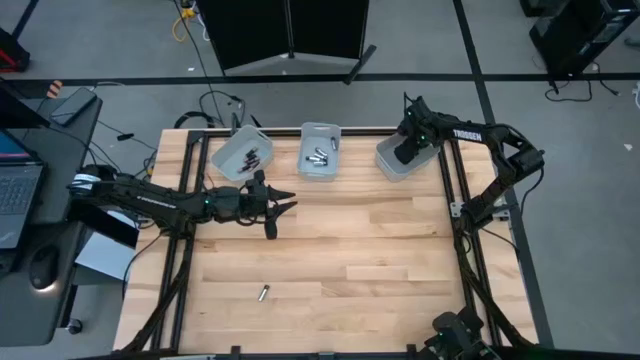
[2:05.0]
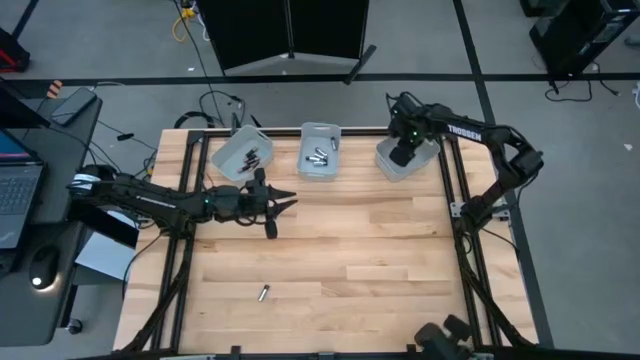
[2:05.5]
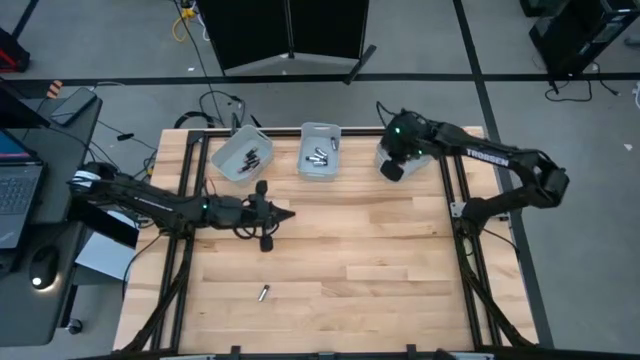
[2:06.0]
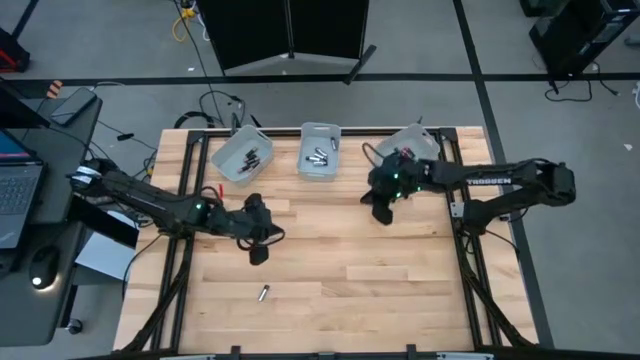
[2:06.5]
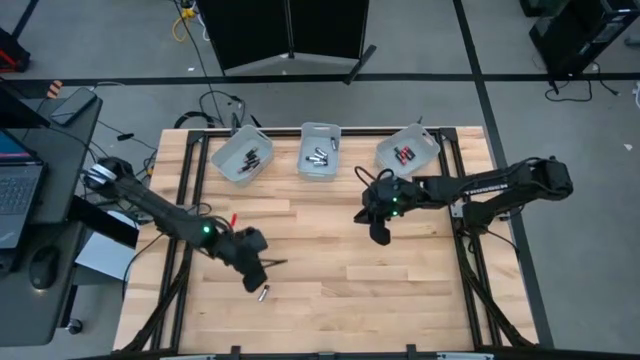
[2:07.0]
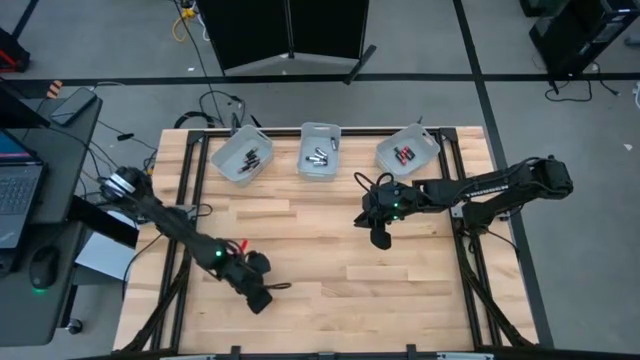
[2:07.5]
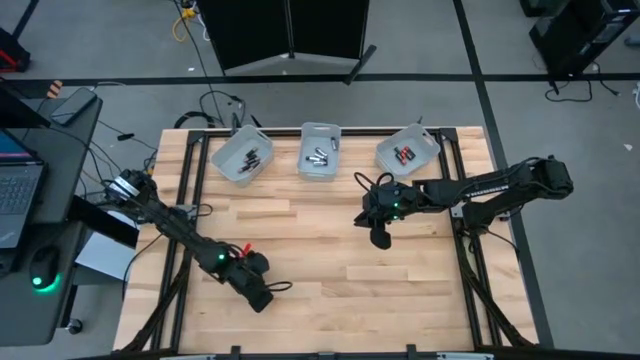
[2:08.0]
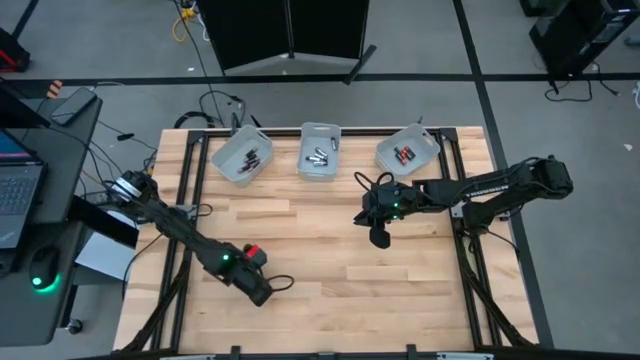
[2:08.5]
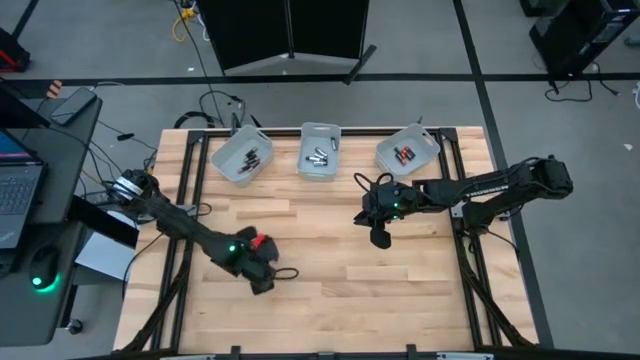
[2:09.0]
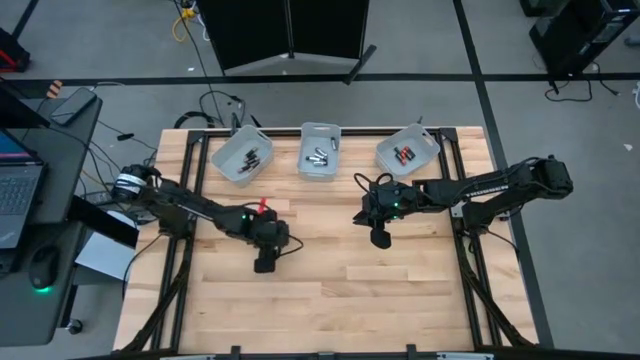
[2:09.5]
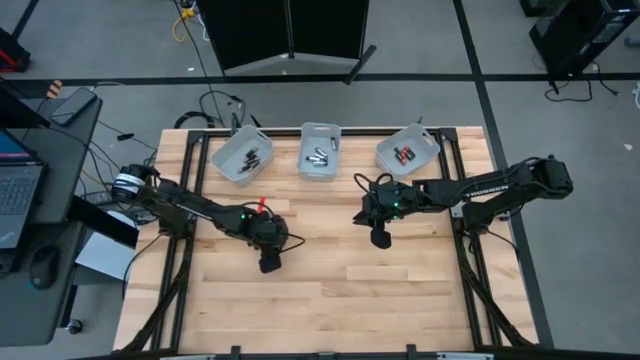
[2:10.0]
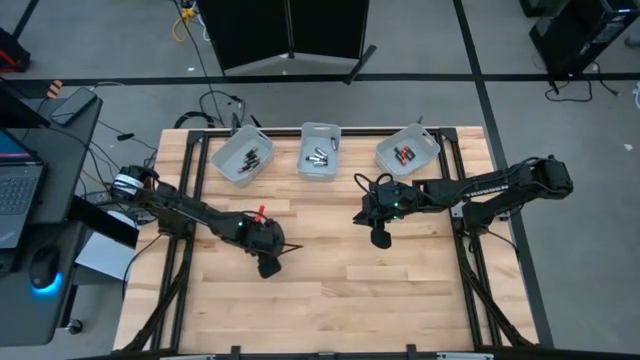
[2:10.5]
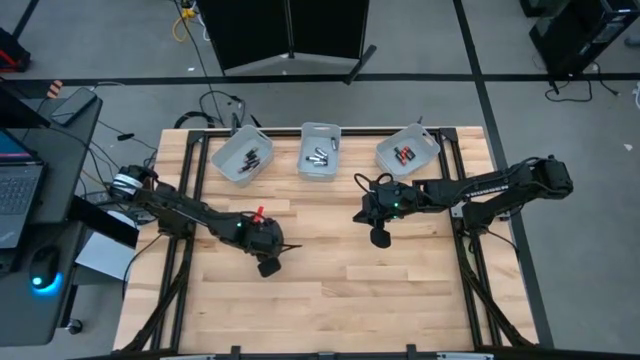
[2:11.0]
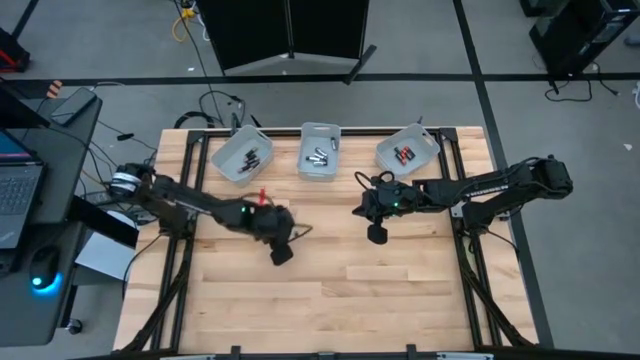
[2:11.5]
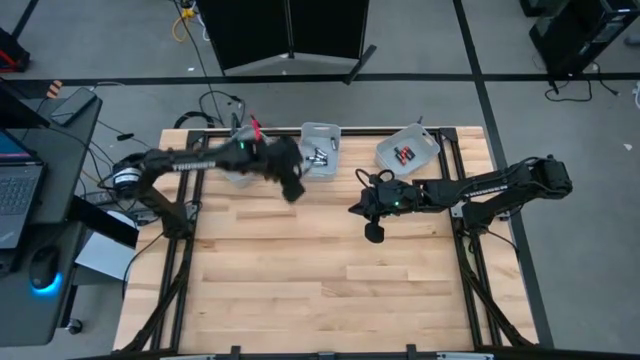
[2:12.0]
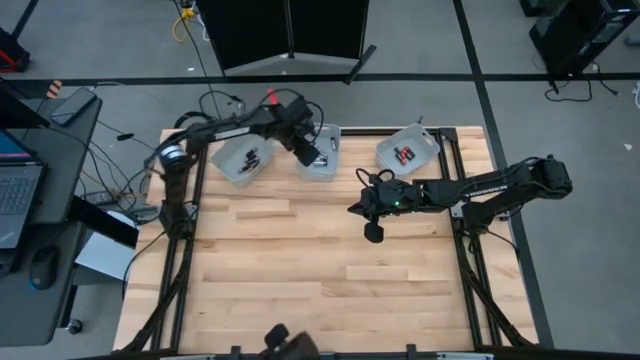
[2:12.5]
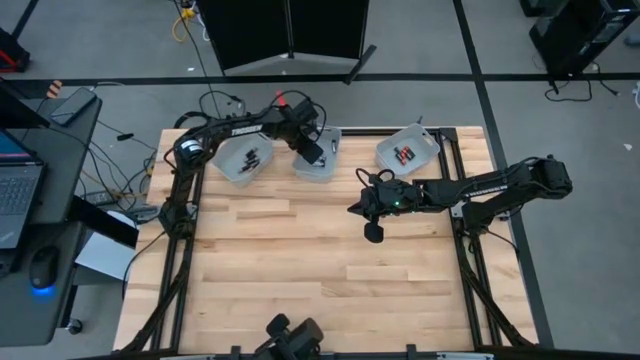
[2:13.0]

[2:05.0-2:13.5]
Task: Sort batteries
Put the silver battery into the middle gray bin

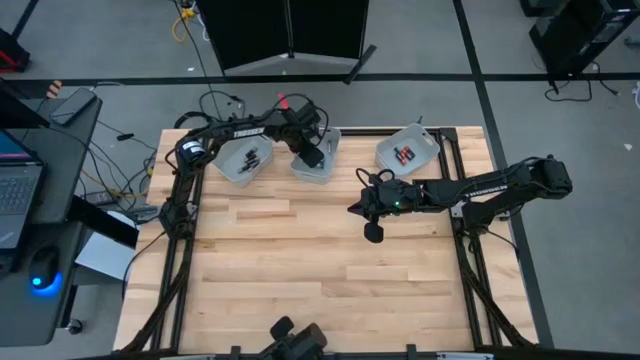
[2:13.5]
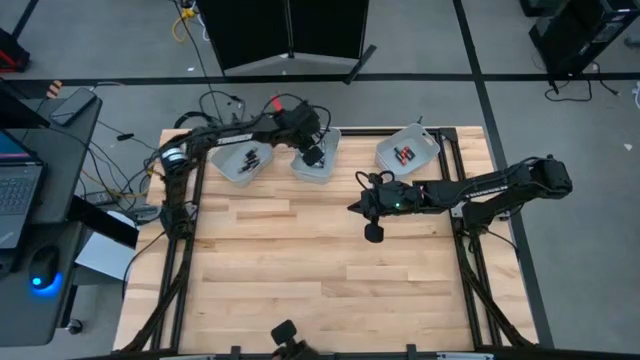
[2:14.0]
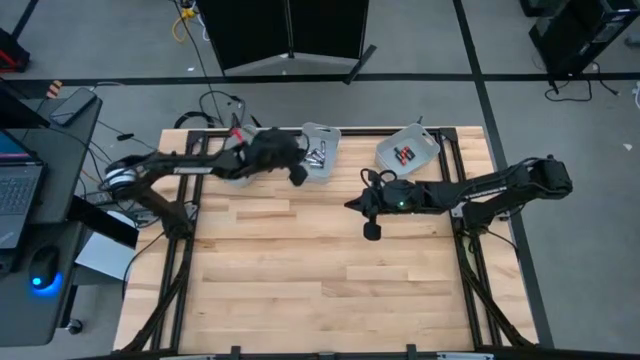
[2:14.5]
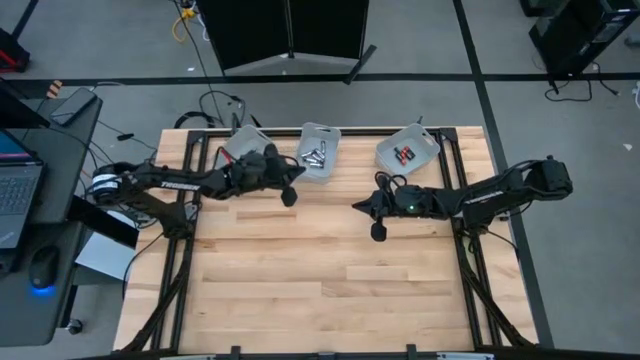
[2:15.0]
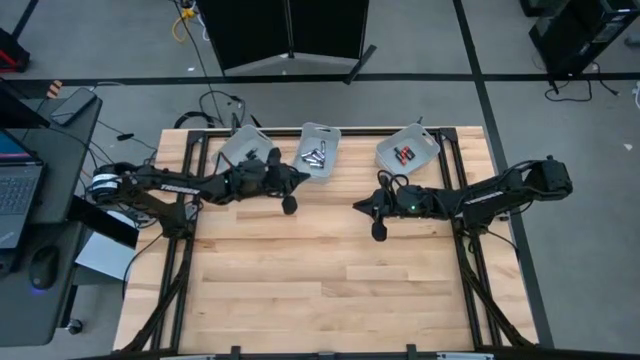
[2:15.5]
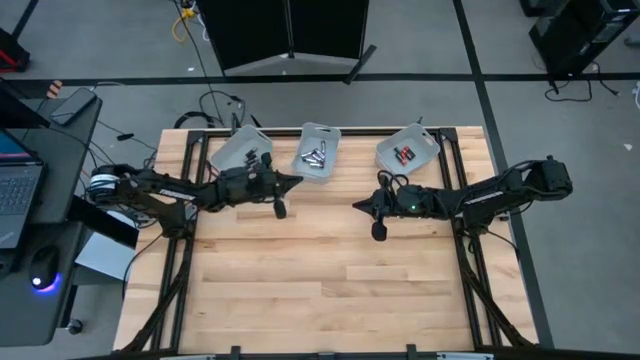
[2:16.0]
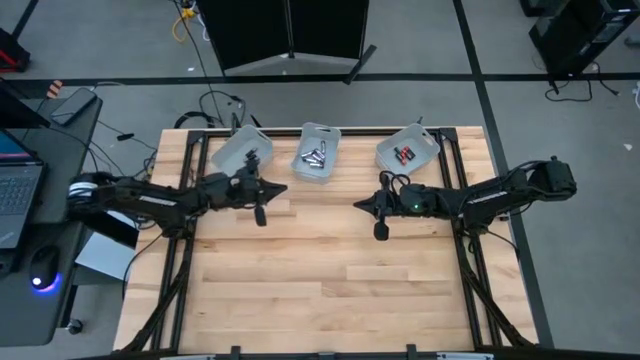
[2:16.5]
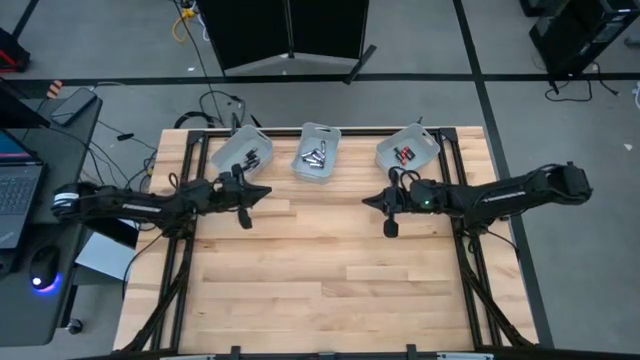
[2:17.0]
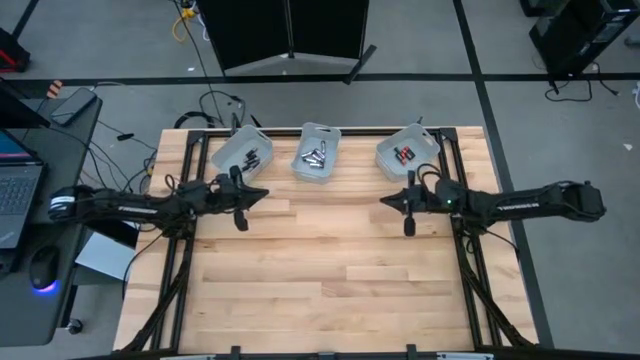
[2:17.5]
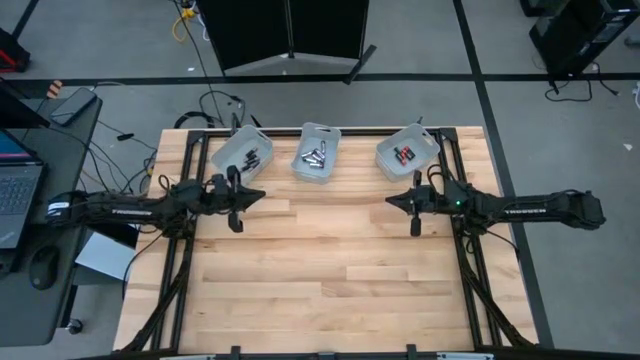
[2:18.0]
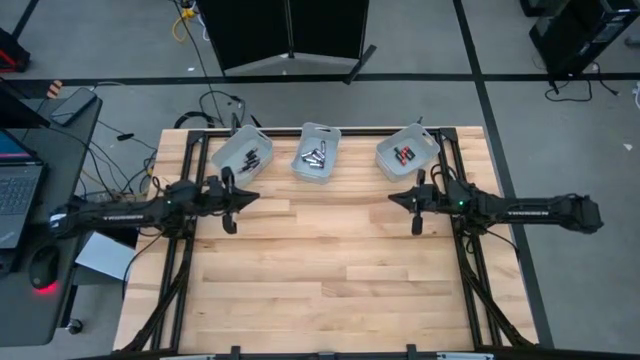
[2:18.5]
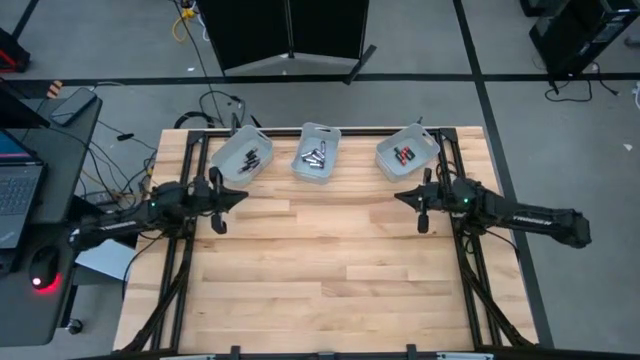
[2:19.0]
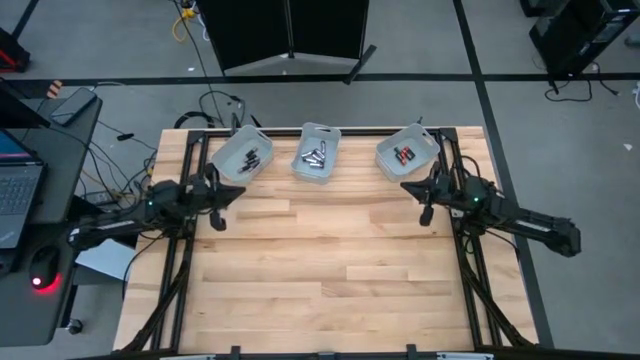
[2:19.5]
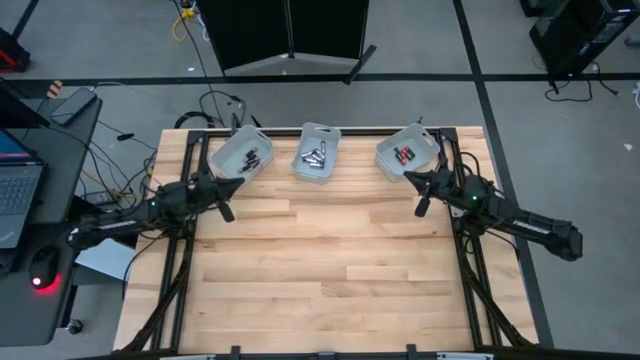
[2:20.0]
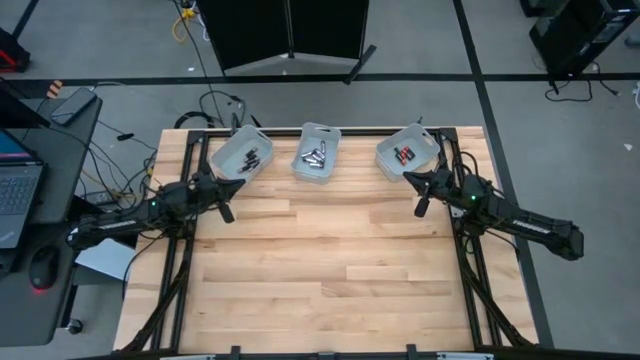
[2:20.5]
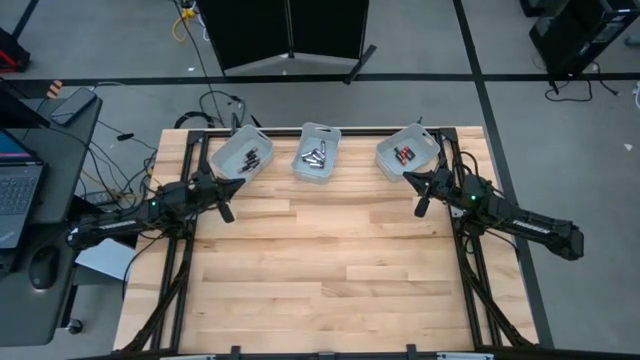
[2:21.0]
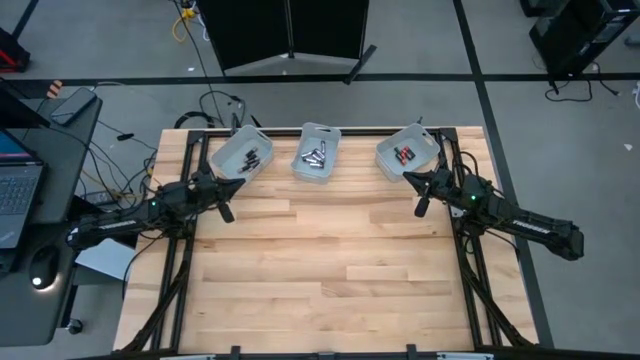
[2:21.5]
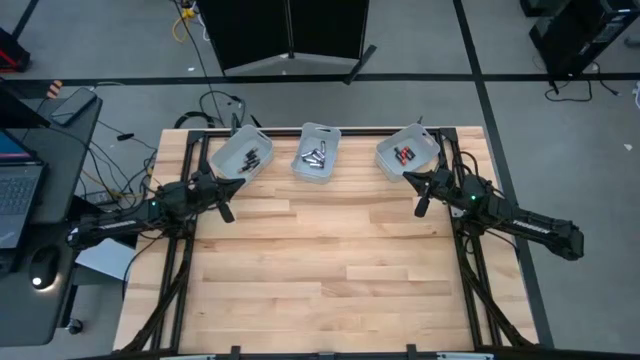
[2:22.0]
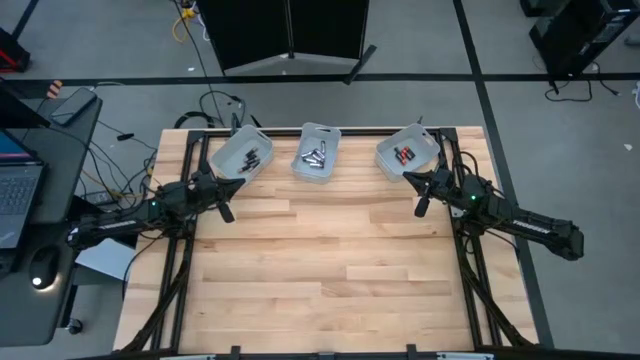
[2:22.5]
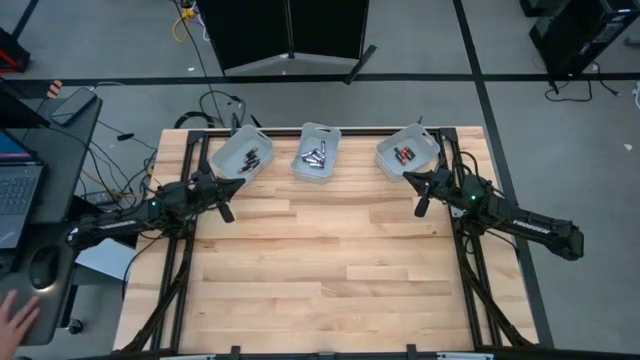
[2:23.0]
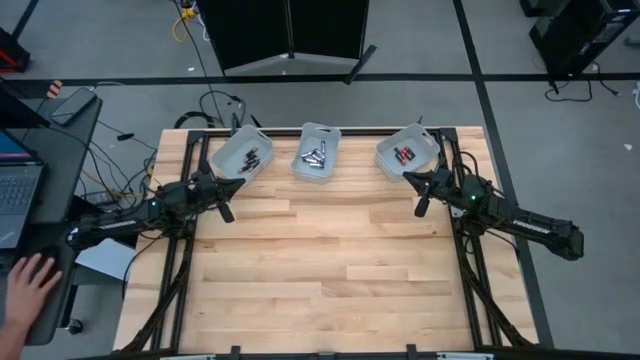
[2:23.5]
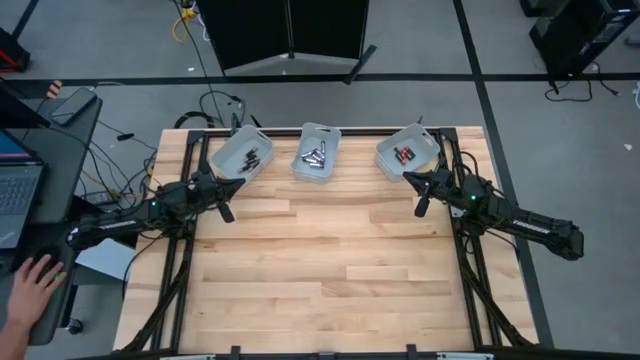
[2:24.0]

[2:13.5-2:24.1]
Return to Home Position
